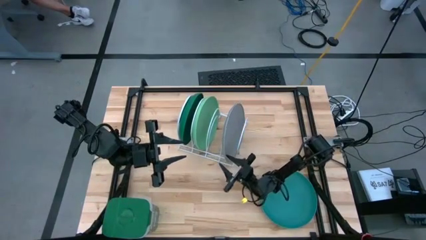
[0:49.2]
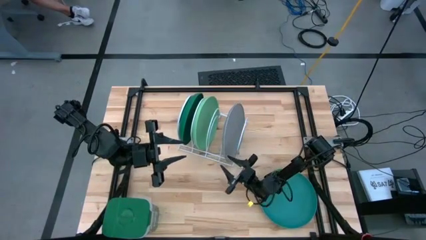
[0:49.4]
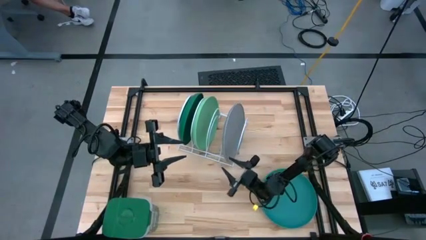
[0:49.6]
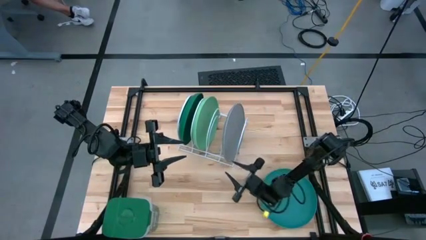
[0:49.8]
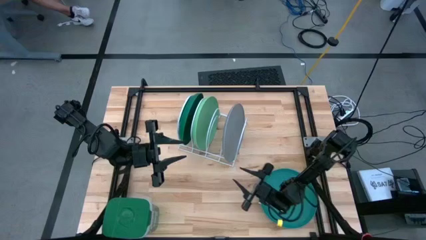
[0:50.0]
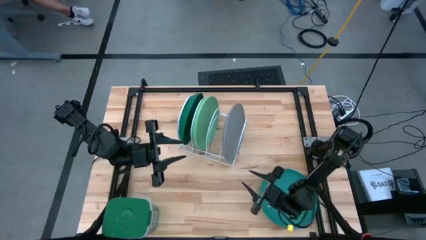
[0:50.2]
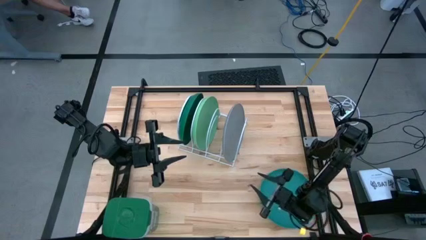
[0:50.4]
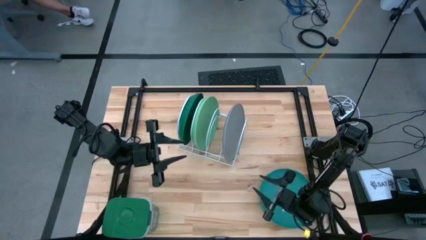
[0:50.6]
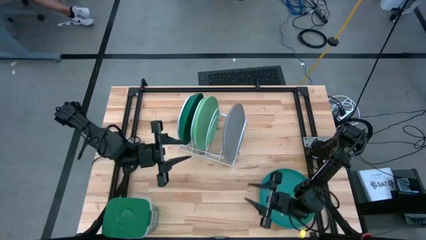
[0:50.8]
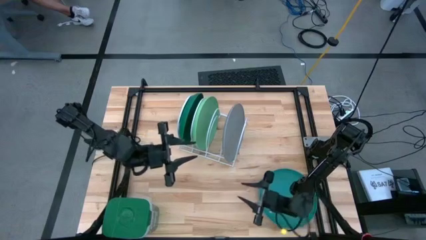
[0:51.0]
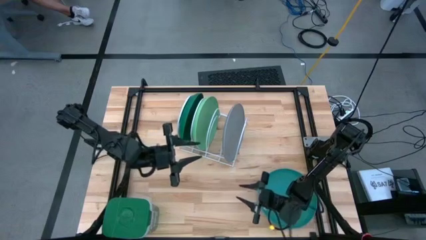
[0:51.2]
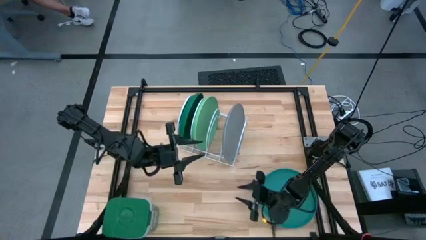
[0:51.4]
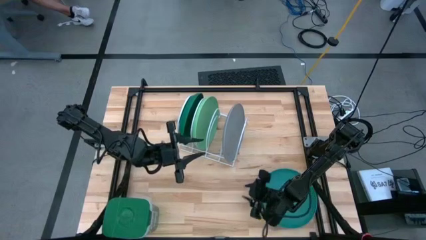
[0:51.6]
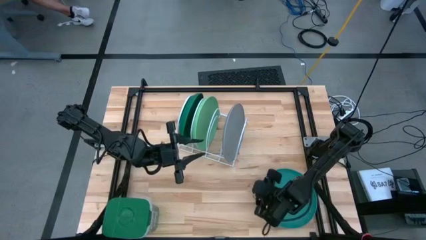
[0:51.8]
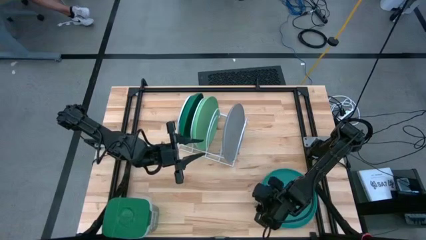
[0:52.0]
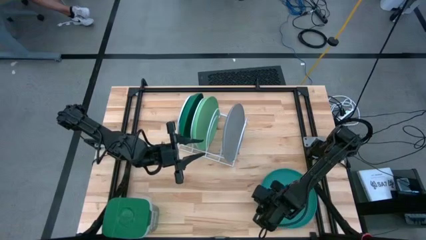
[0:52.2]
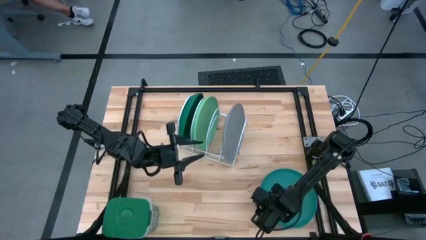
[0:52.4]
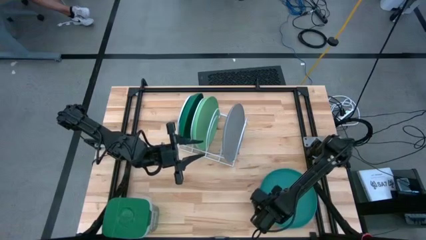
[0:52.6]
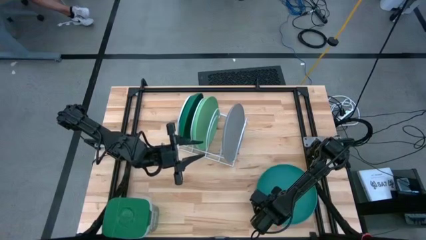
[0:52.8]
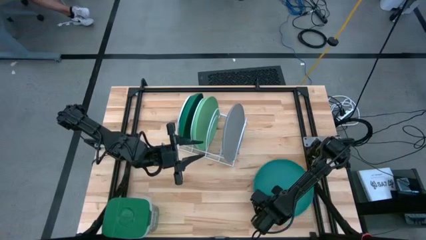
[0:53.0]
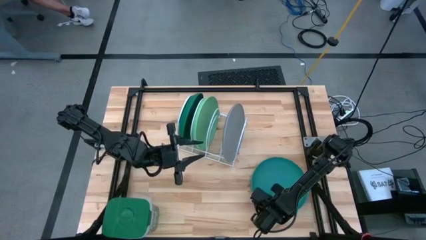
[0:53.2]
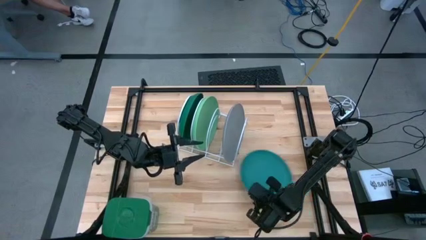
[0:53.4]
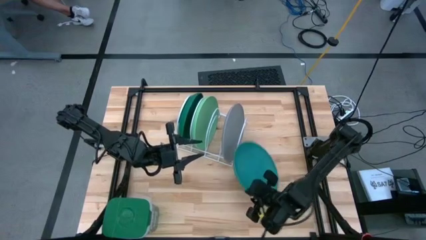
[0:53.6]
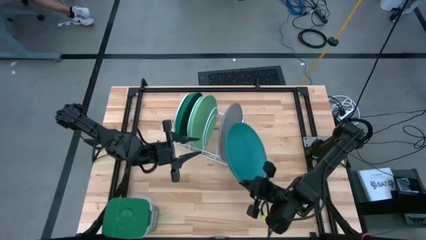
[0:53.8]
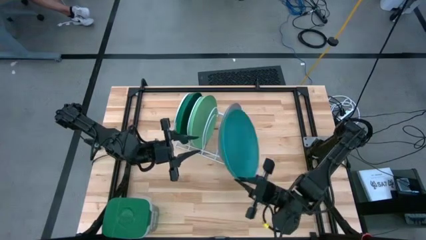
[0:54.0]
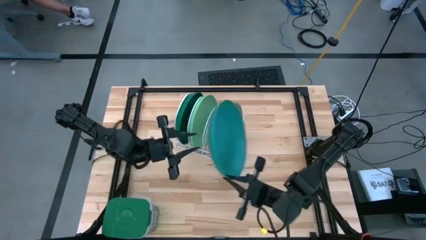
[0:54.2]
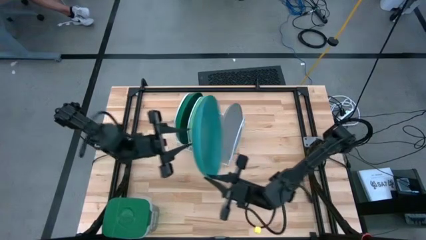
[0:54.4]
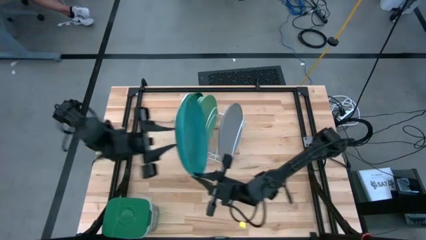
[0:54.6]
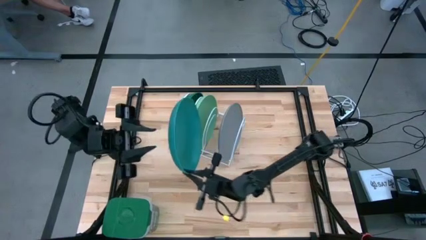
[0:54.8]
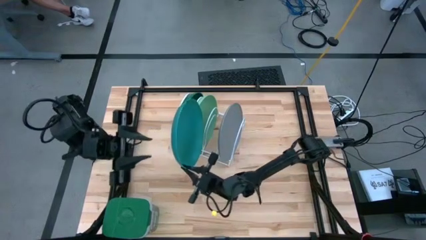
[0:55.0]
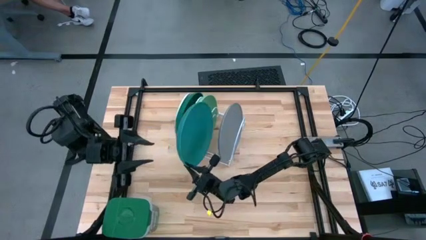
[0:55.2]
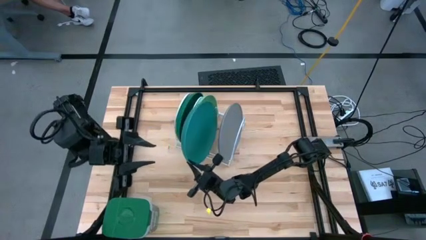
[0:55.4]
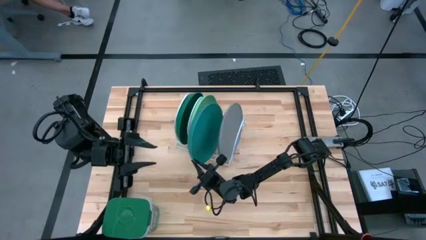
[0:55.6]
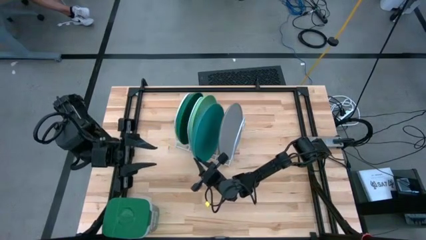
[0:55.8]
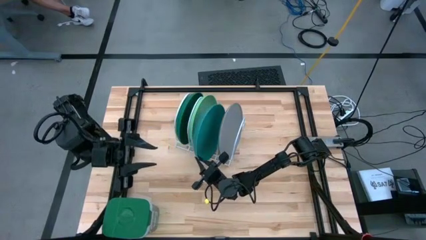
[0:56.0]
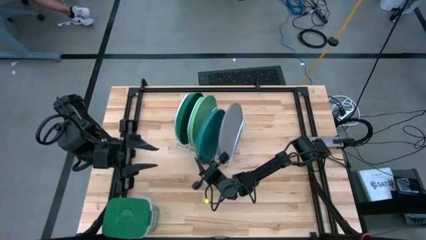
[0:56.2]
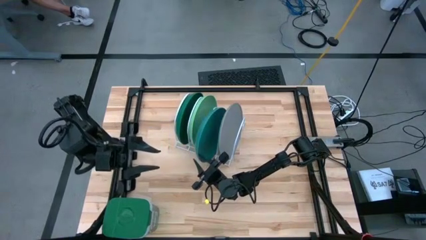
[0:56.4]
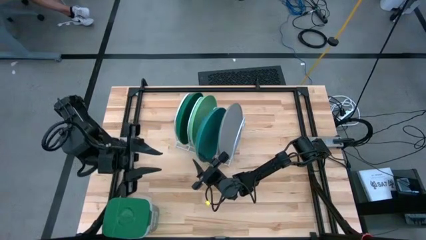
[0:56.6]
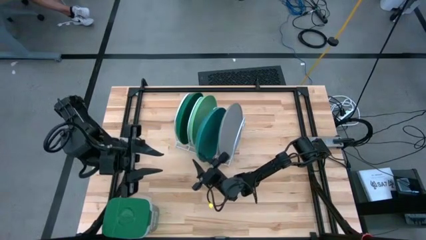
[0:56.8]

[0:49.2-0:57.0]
Task: Sort dishes
Put the dark green plate into the white dish rack

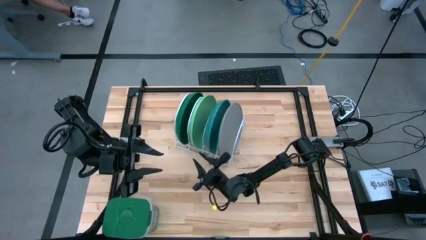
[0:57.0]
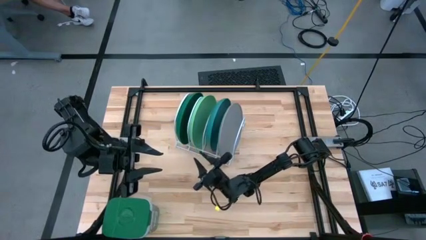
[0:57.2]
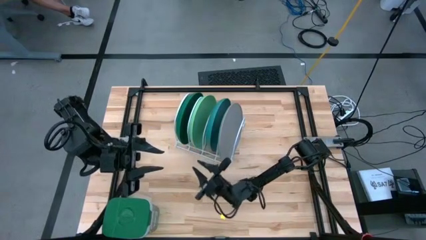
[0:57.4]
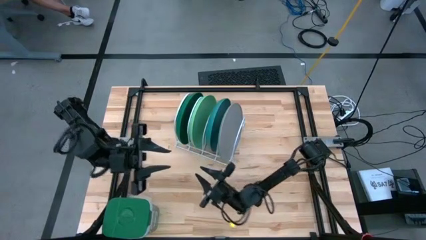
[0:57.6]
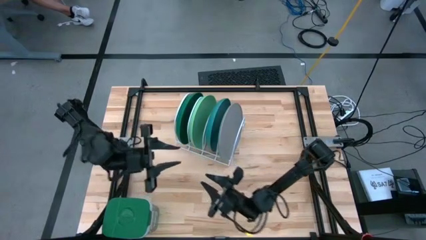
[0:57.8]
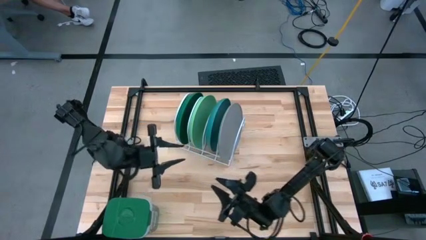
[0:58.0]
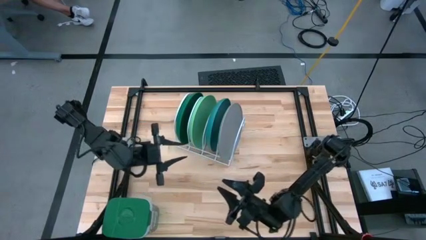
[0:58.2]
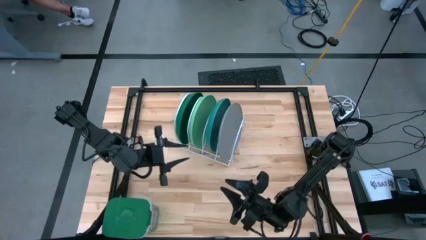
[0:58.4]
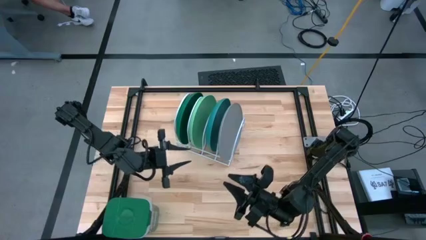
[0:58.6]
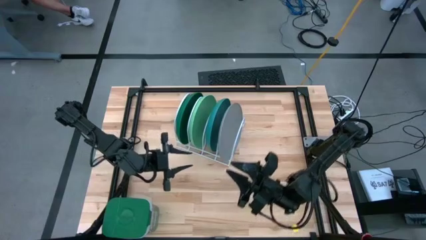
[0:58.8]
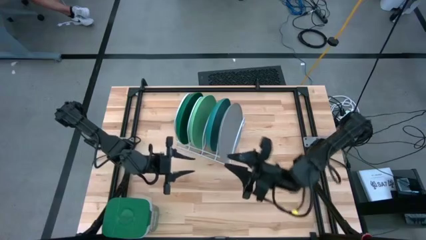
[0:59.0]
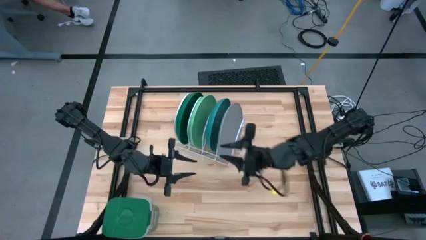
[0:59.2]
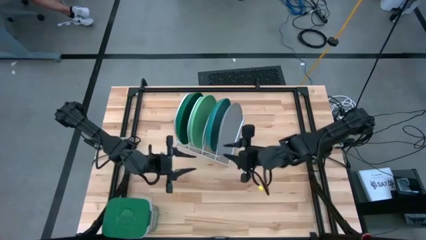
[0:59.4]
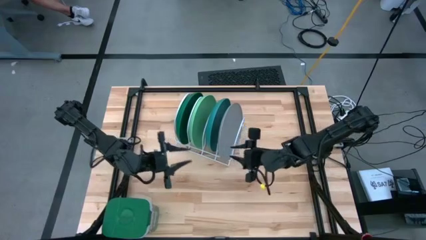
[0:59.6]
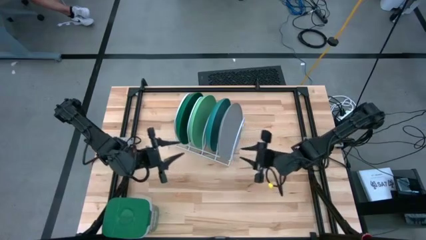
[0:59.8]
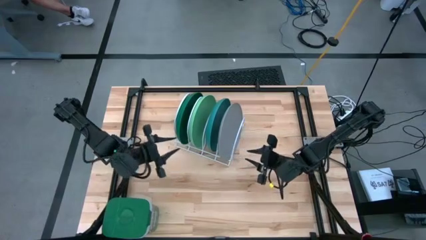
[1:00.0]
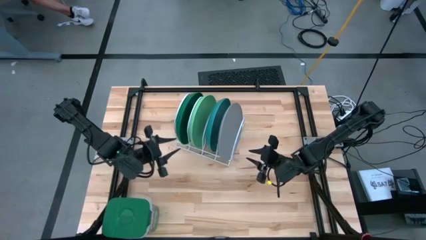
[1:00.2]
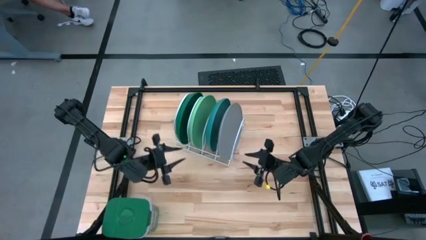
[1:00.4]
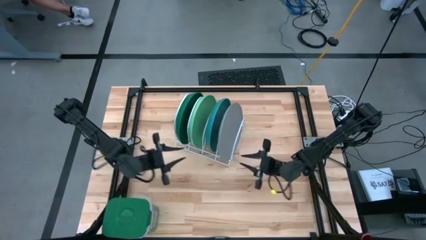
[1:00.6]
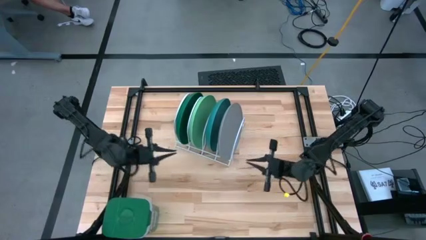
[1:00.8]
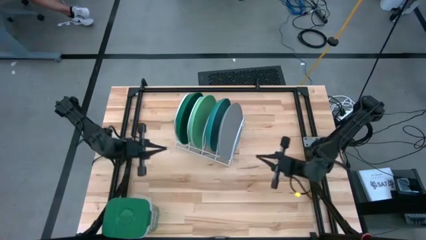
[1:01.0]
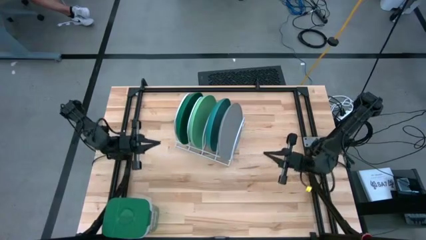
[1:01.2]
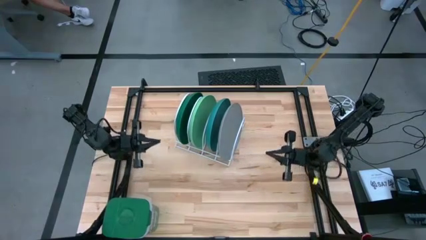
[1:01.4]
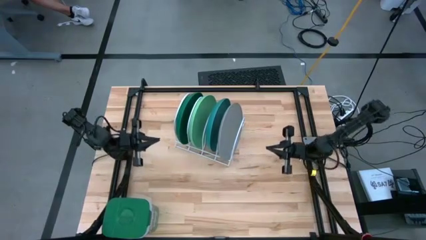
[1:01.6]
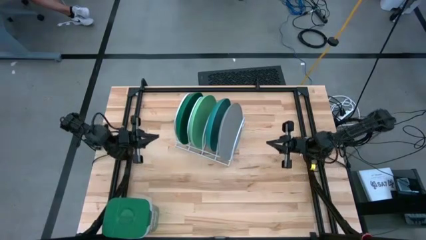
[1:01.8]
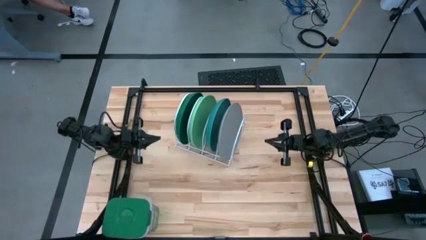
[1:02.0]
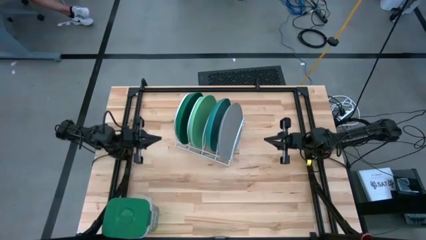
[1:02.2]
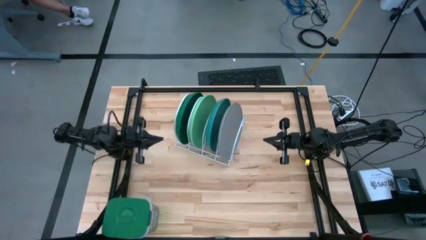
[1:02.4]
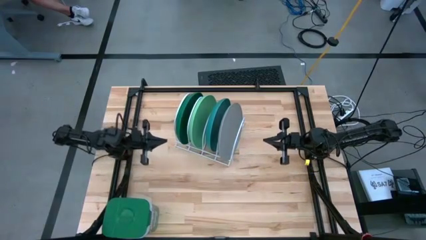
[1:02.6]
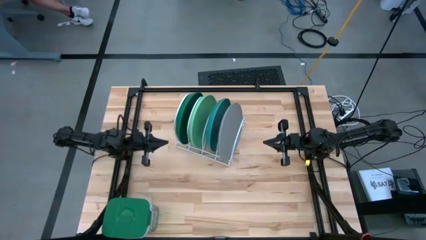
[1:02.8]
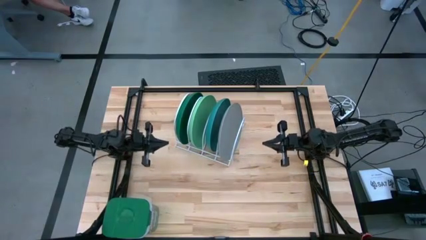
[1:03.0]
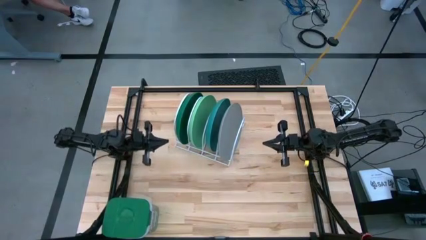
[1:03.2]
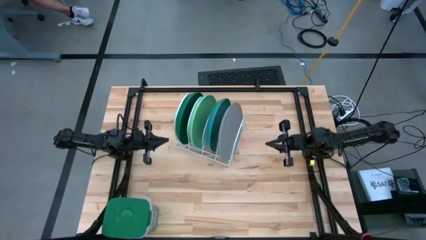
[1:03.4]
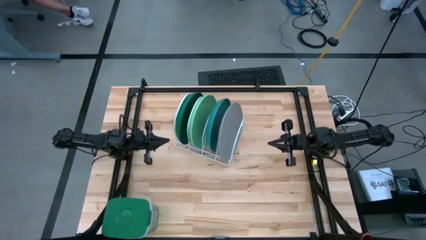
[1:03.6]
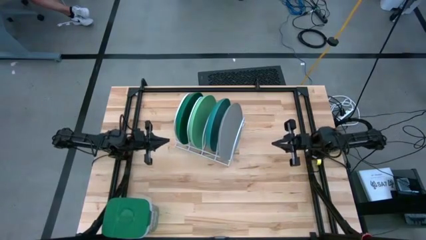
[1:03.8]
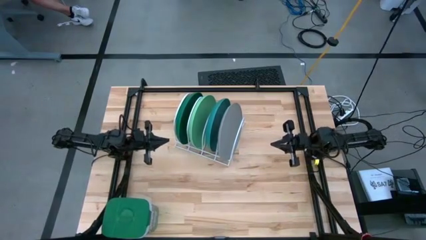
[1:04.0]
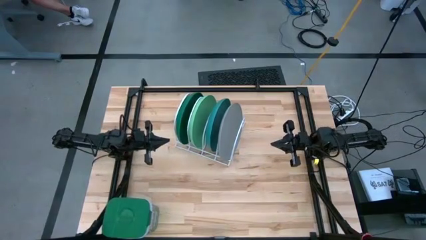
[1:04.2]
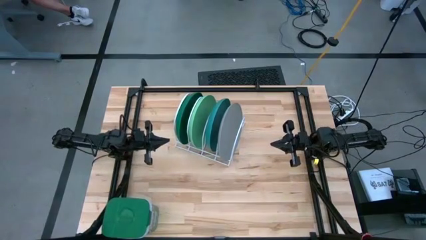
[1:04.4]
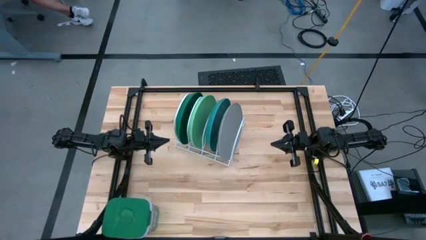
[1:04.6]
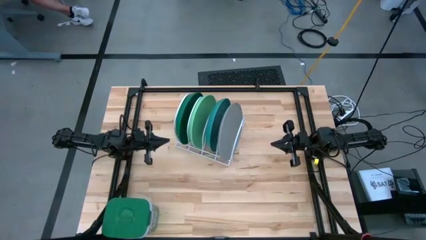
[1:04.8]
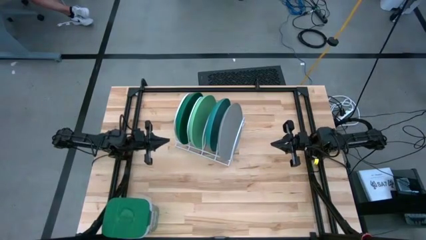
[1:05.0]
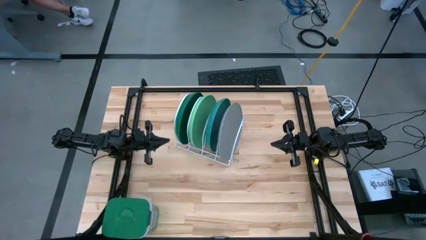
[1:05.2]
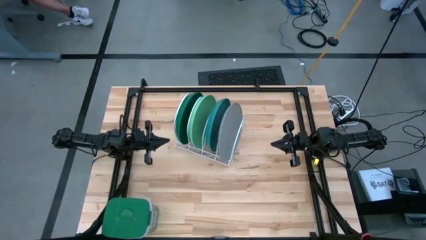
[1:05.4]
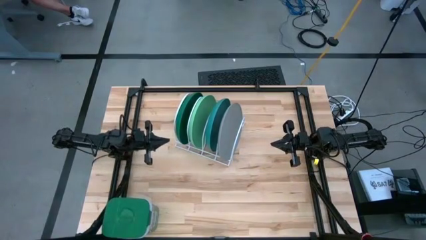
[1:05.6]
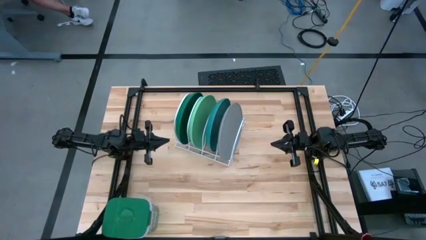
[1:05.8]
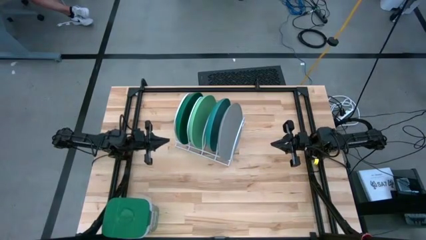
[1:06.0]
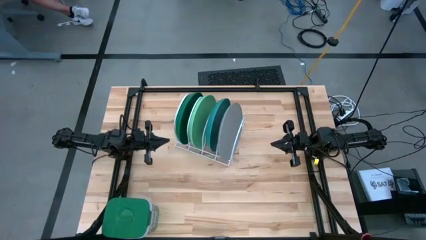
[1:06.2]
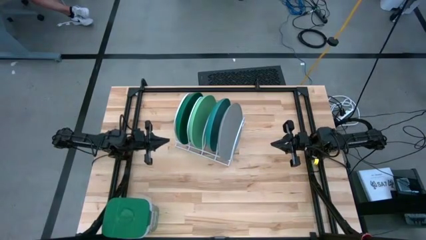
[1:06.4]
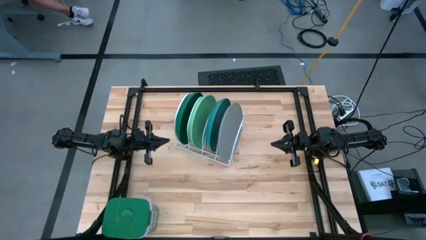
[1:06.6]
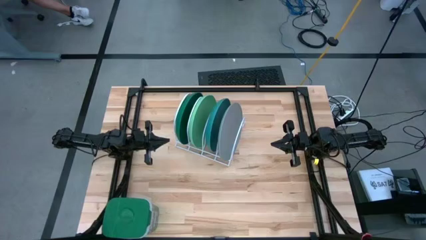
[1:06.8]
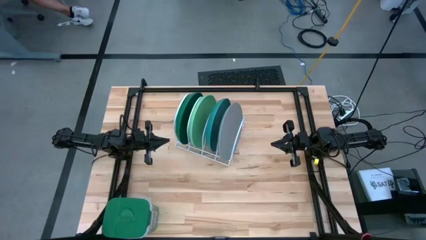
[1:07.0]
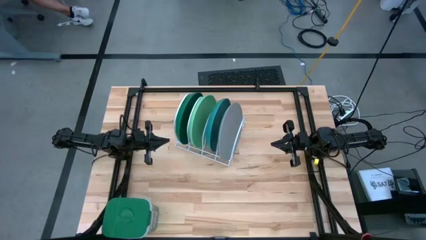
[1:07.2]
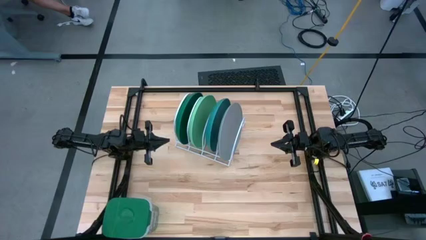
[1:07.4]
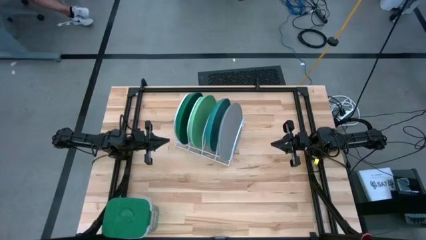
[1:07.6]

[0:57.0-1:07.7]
Return to Home Position
